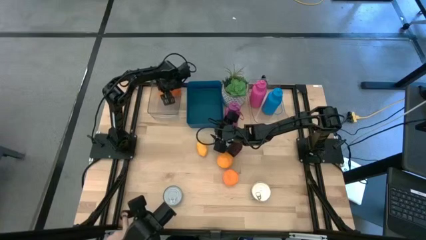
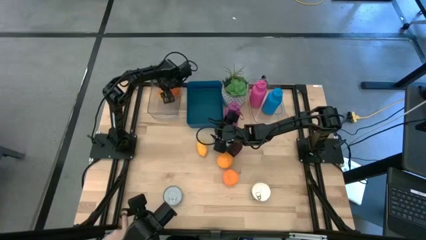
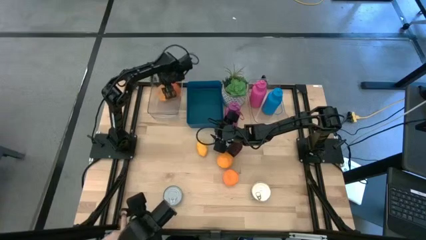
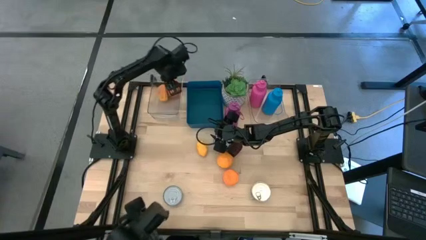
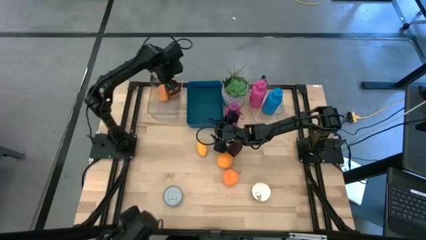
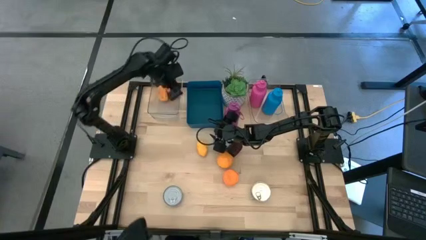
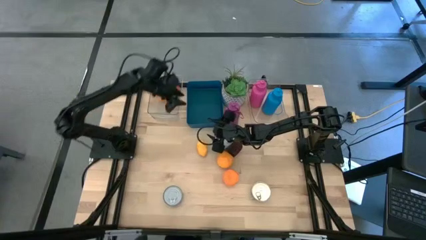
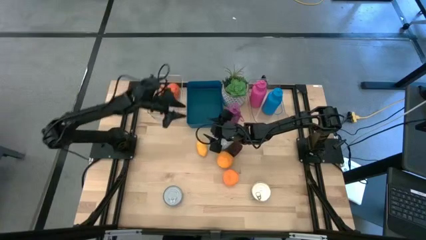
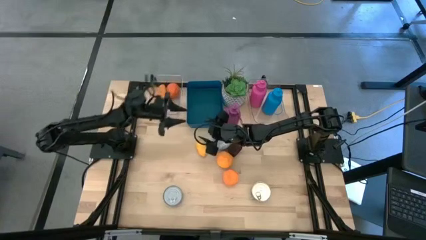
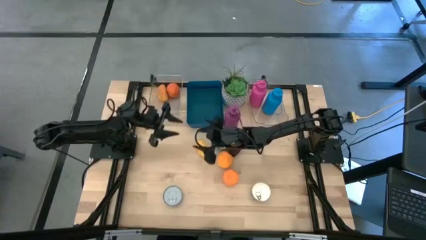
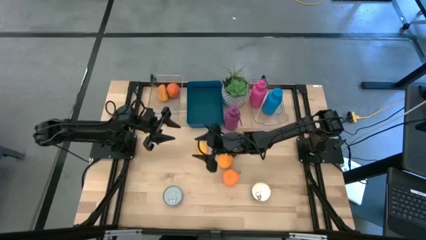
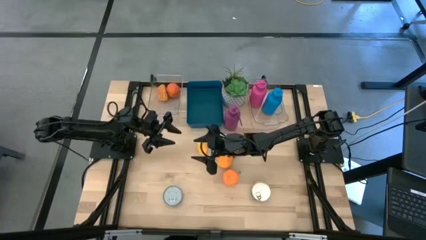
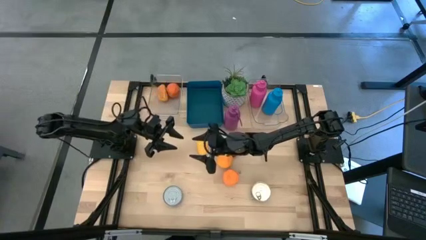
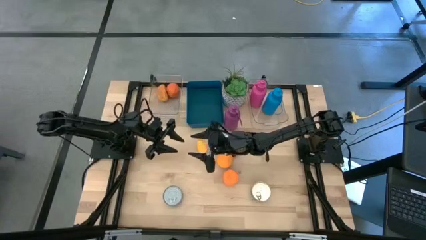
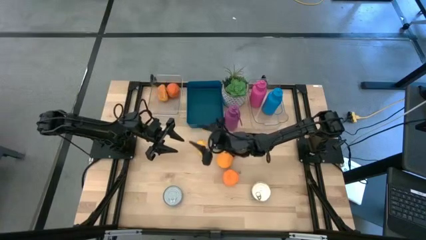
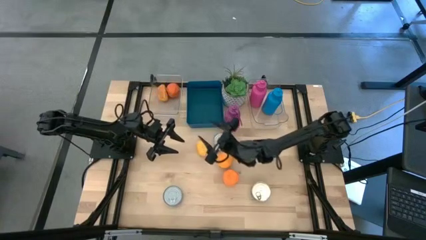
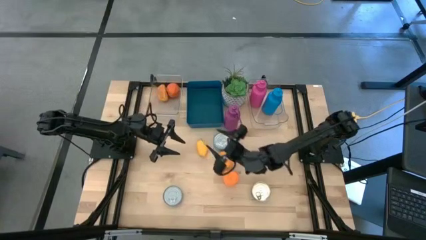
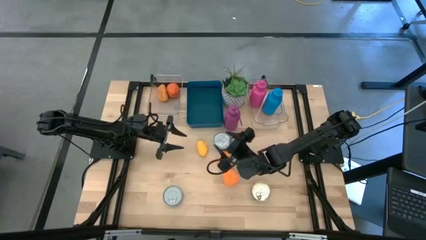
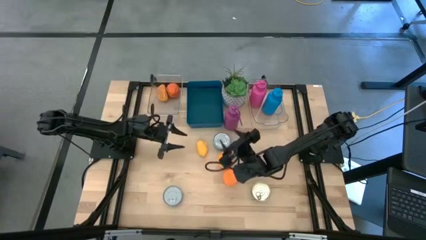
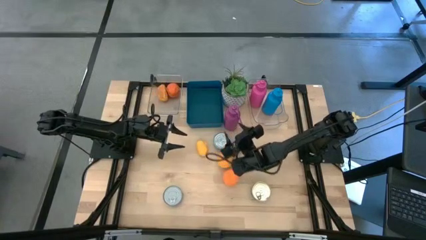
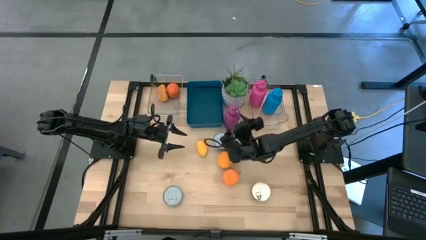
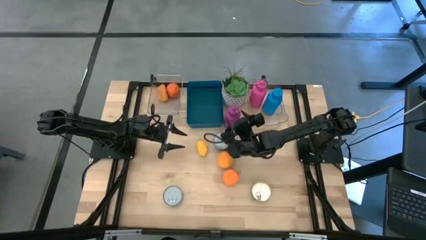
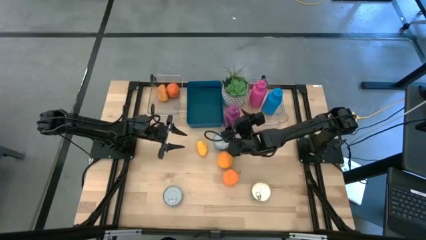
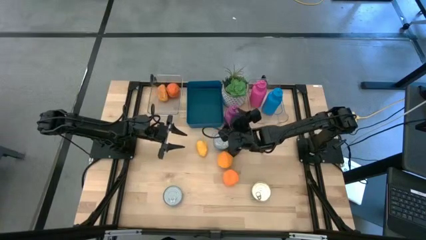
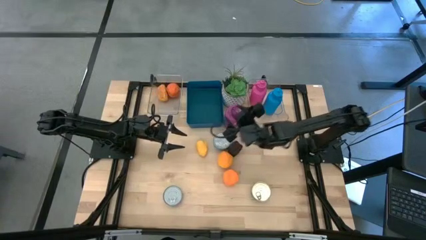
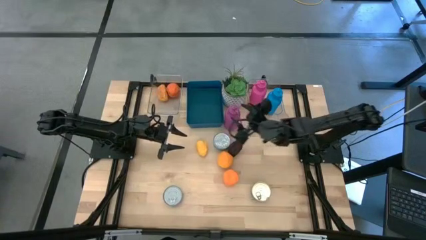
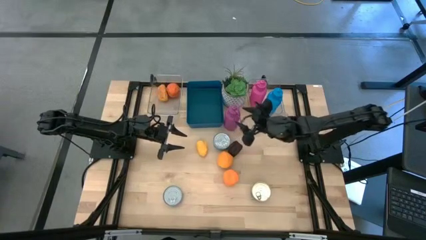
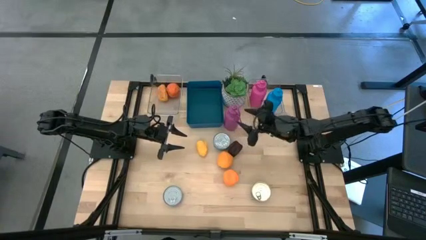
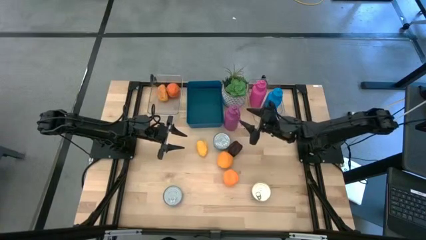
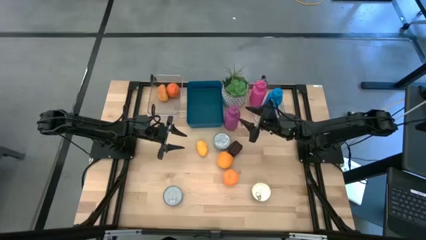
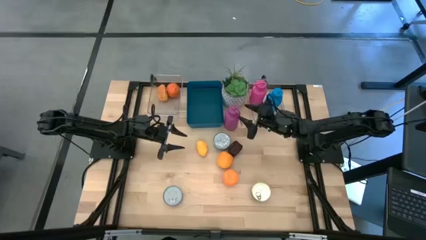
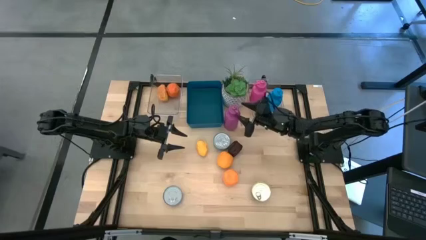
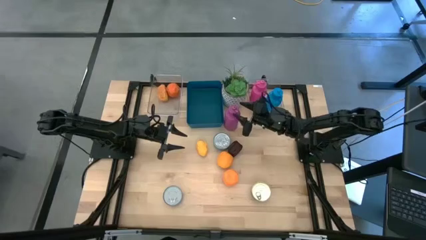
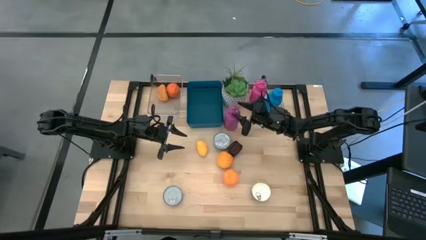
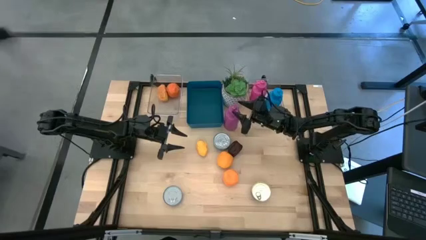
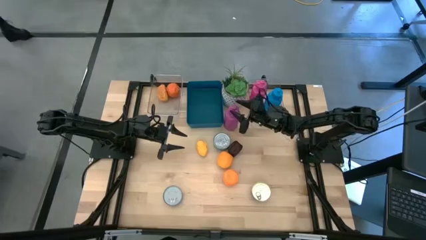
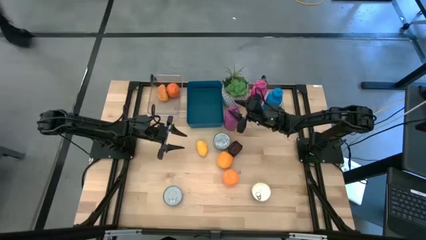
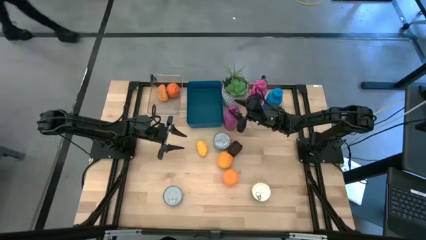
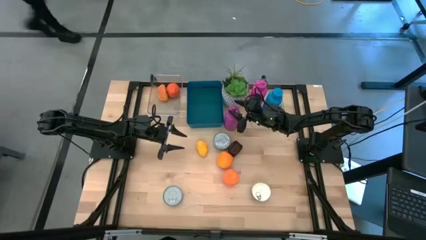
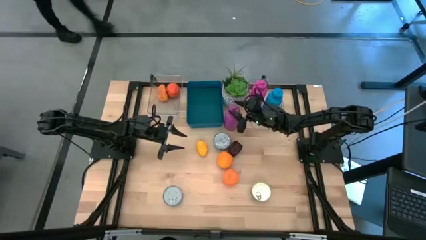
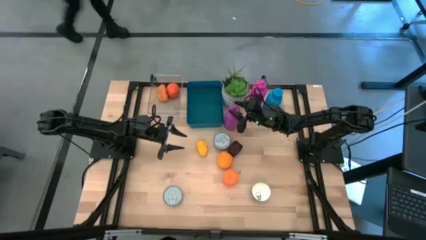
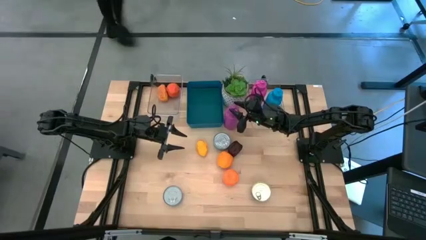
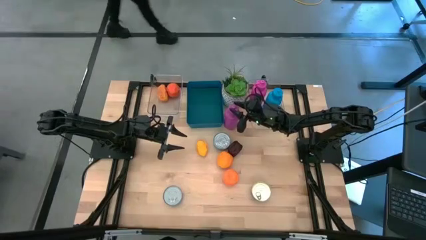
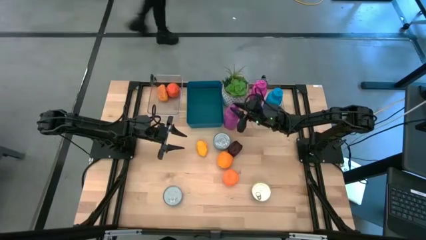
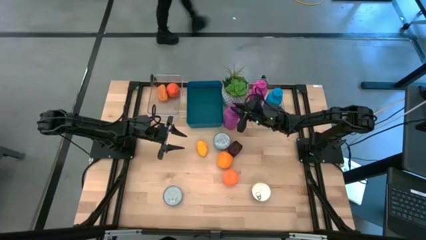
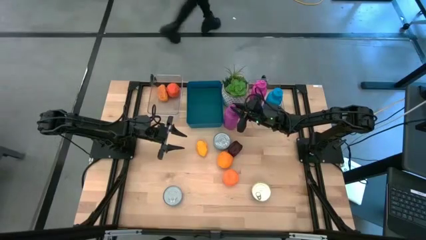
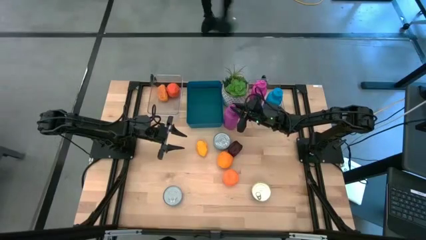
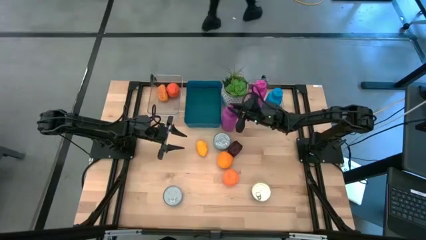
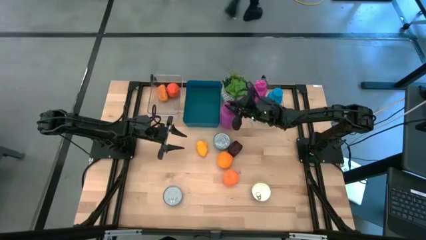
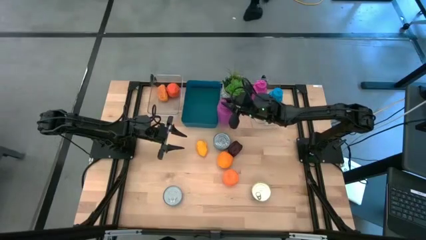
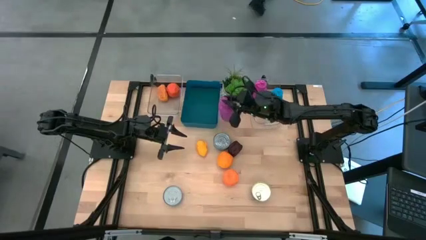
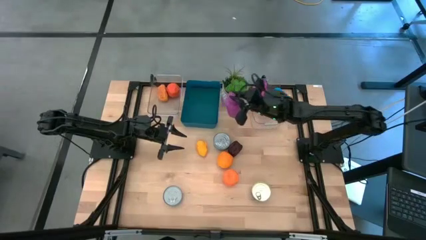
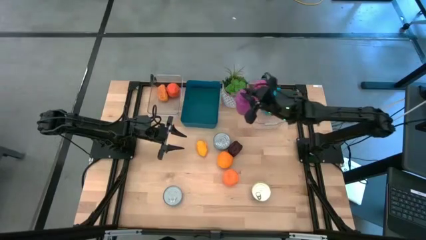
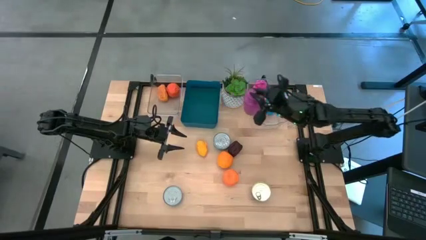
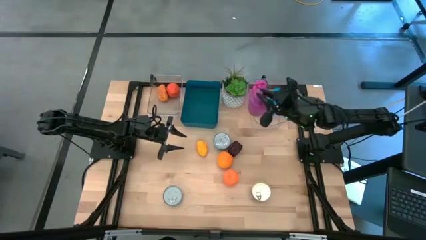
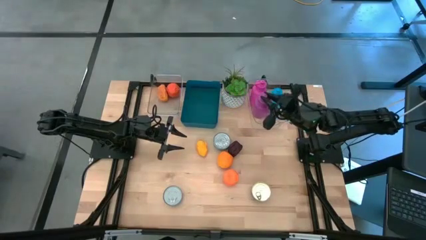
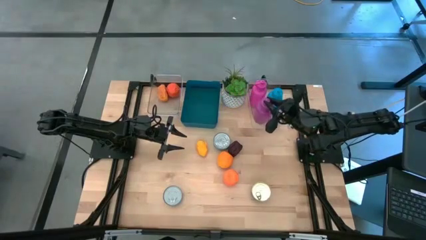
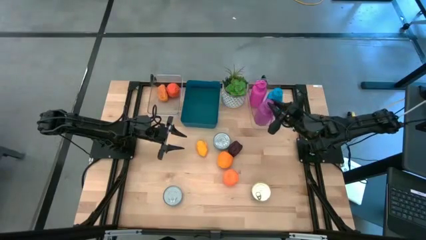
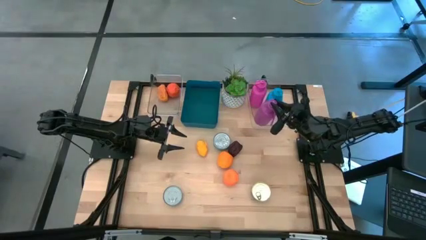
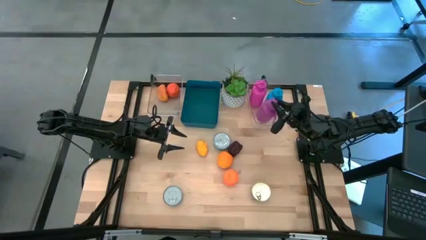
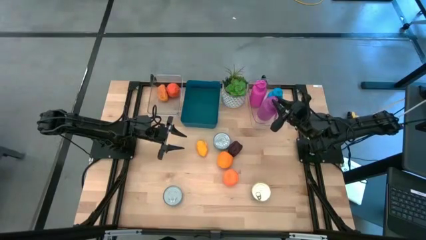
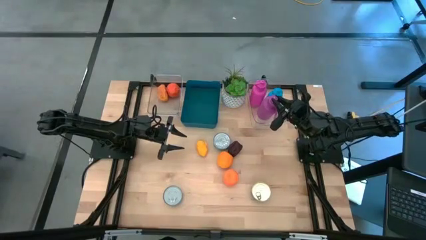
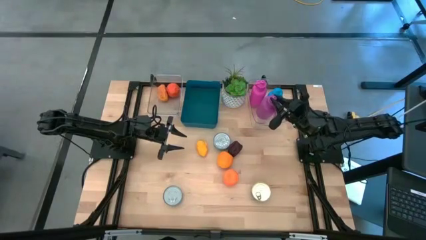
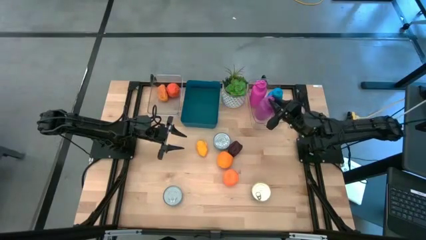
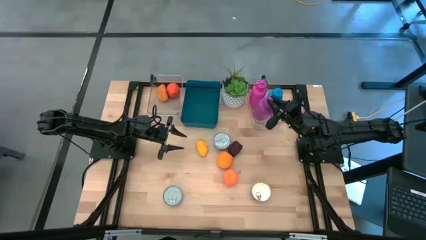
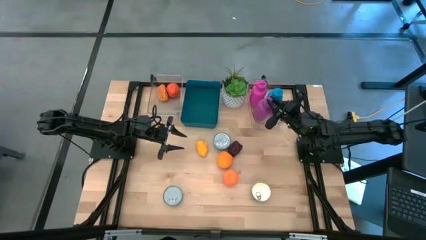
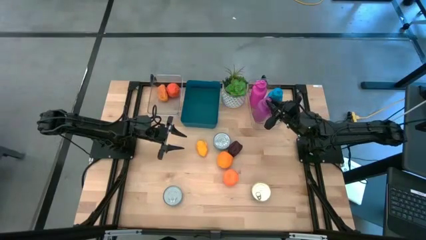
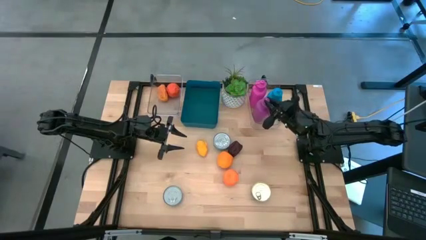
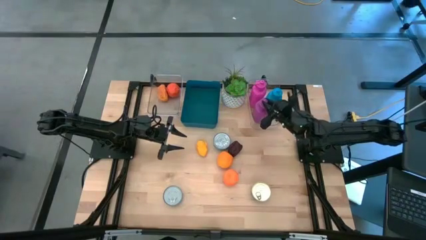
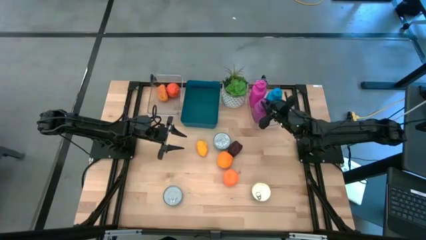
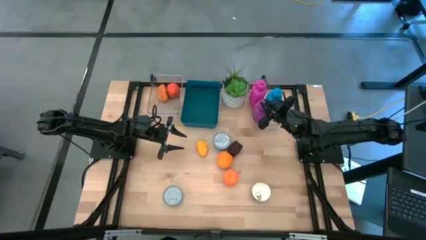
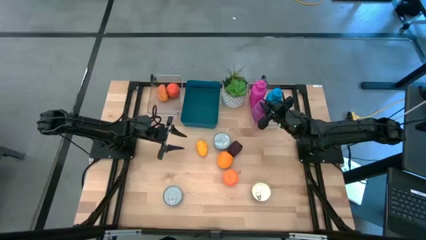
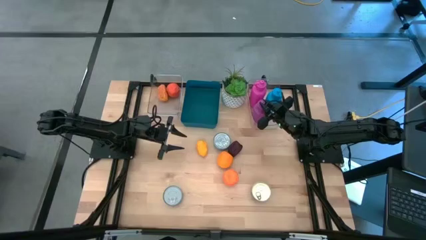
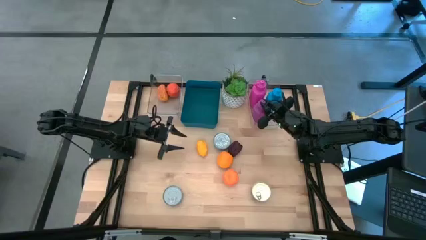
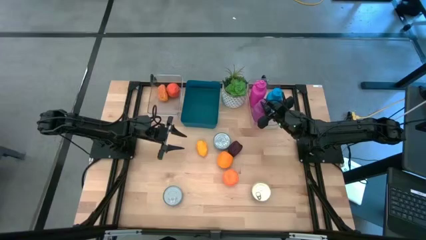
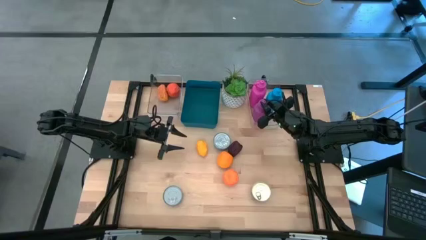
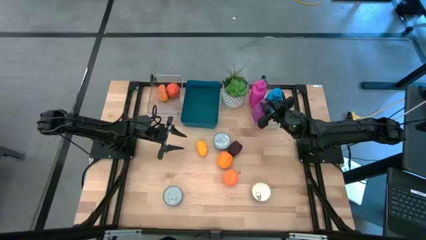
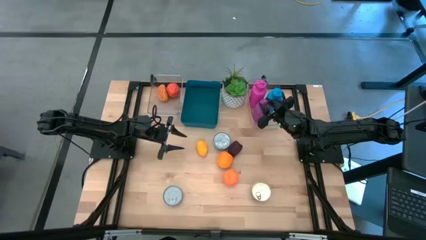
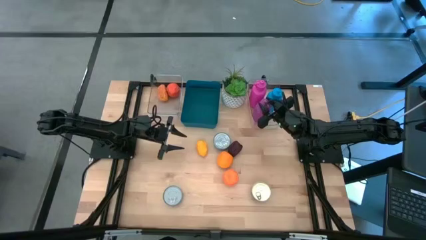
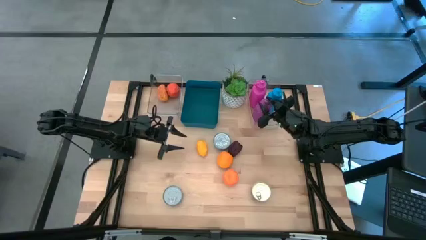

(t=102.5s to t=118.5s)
Task: Pick & Place Food Item
Put the purple tumbler into the right transparent bin
